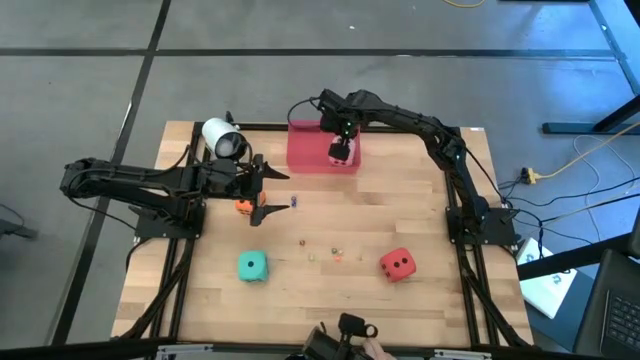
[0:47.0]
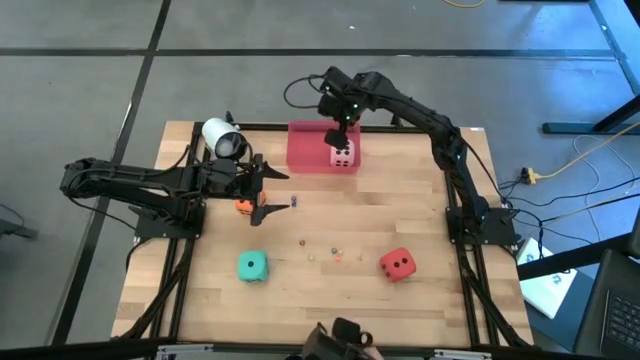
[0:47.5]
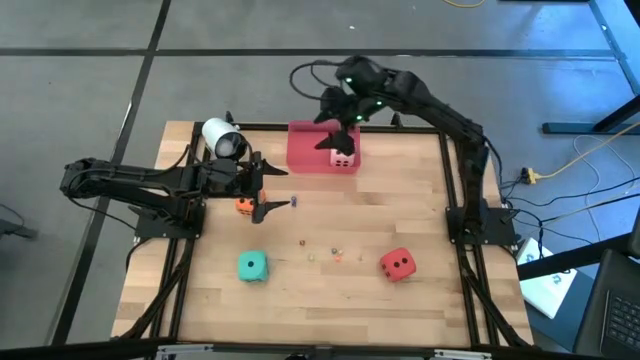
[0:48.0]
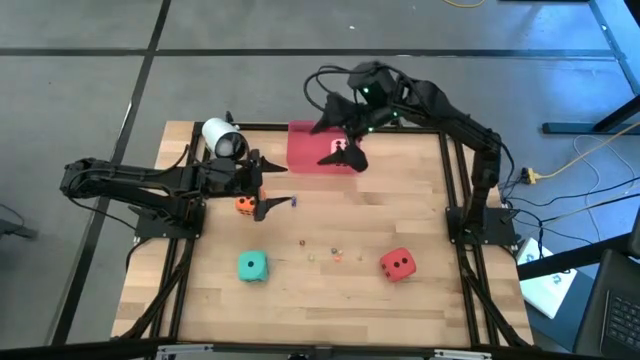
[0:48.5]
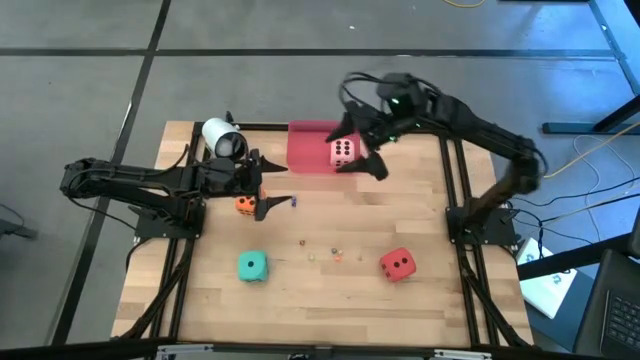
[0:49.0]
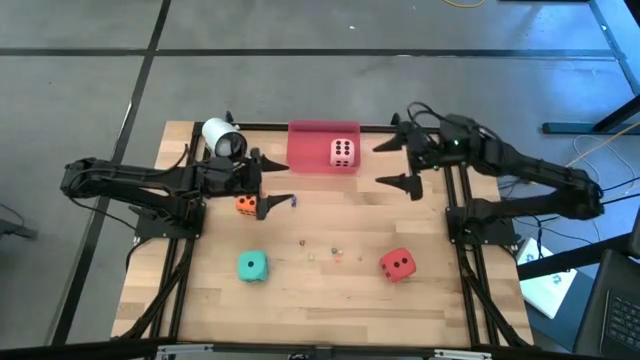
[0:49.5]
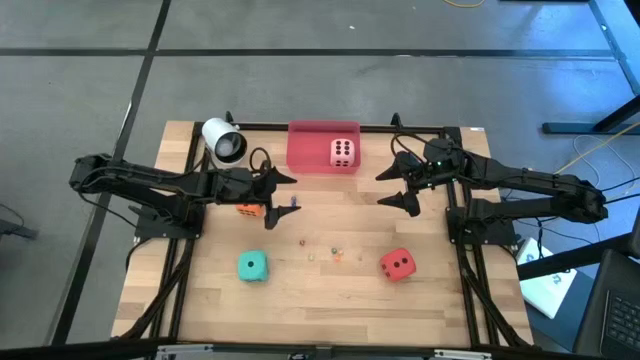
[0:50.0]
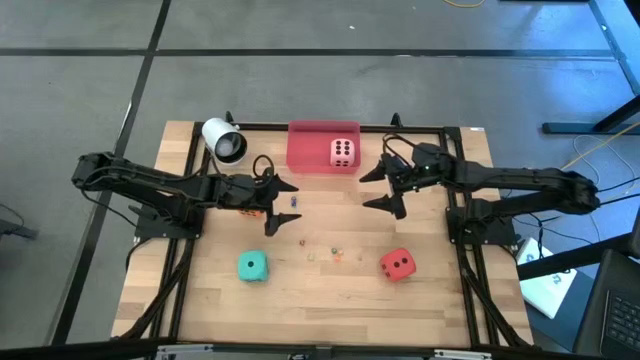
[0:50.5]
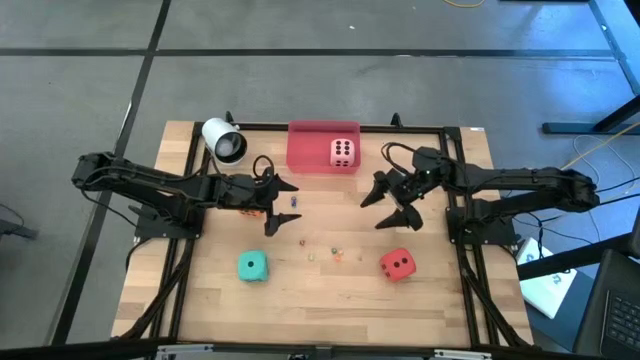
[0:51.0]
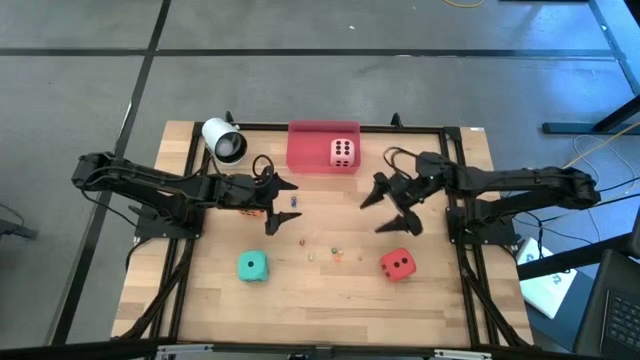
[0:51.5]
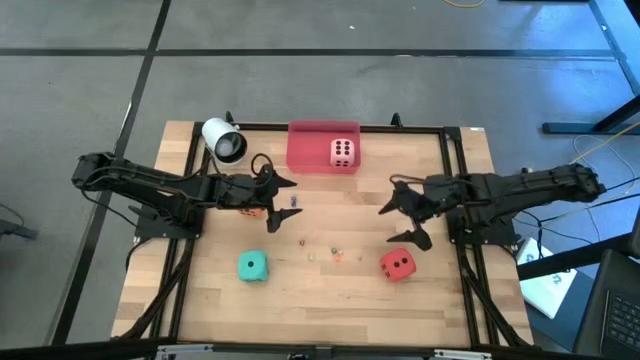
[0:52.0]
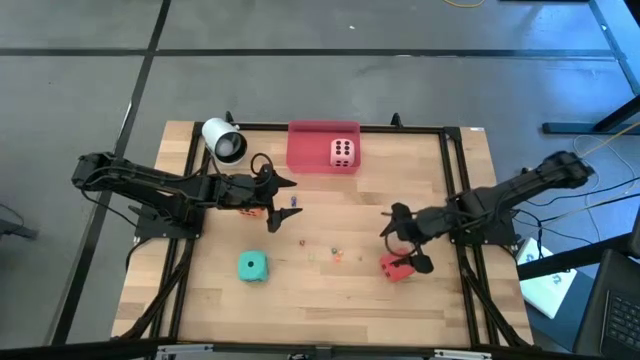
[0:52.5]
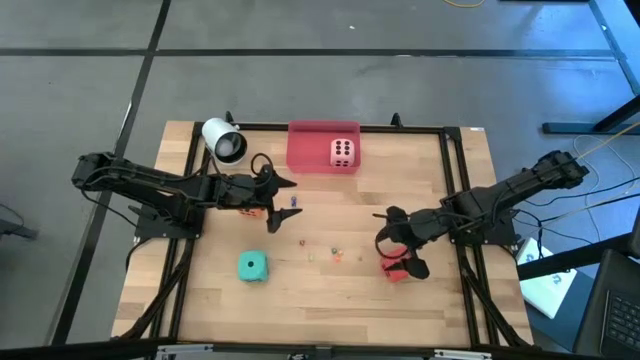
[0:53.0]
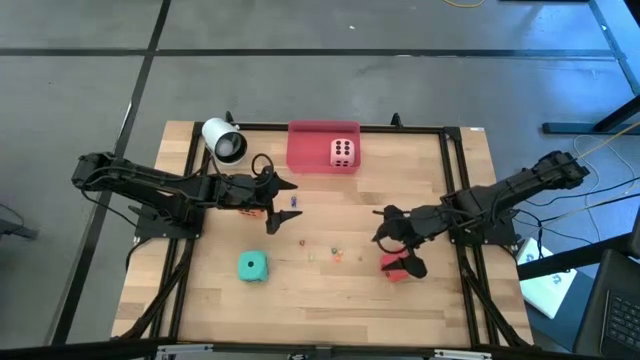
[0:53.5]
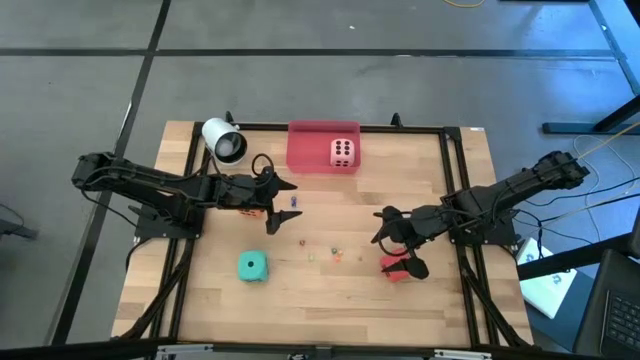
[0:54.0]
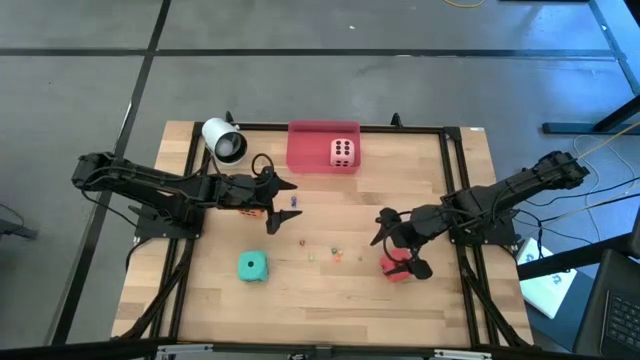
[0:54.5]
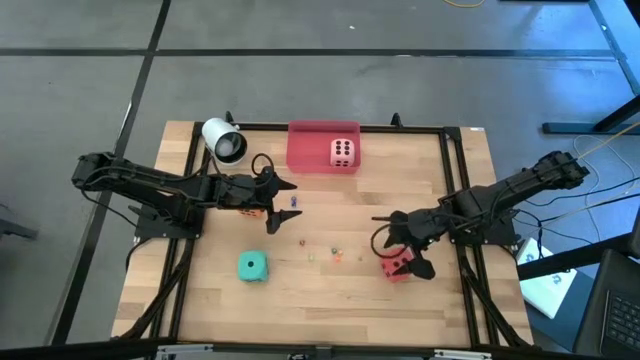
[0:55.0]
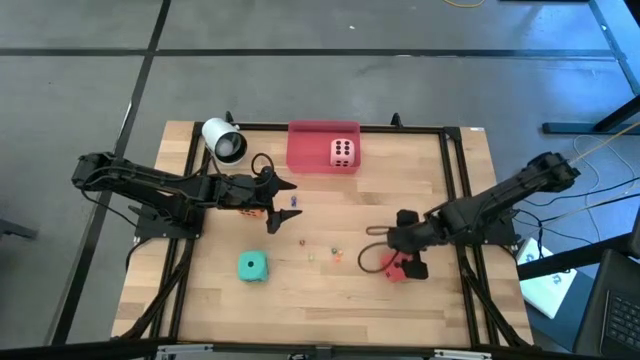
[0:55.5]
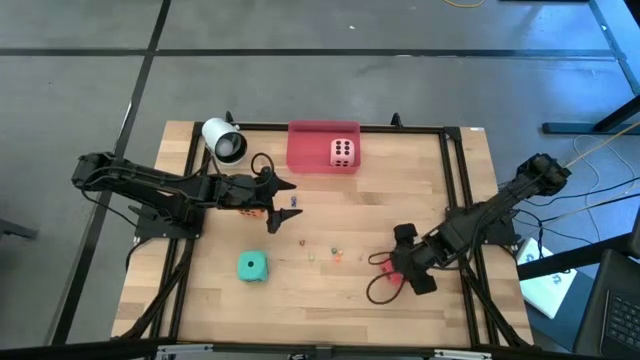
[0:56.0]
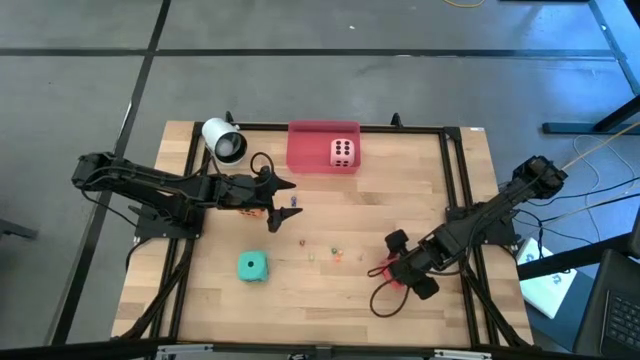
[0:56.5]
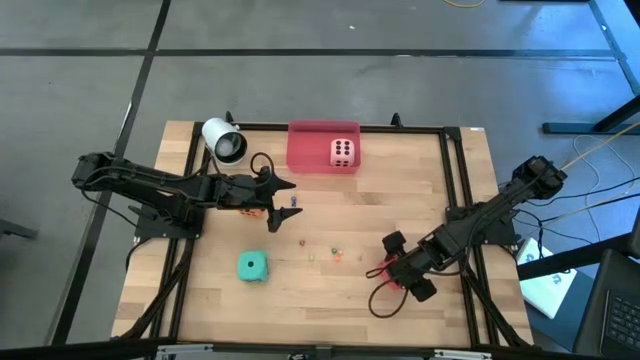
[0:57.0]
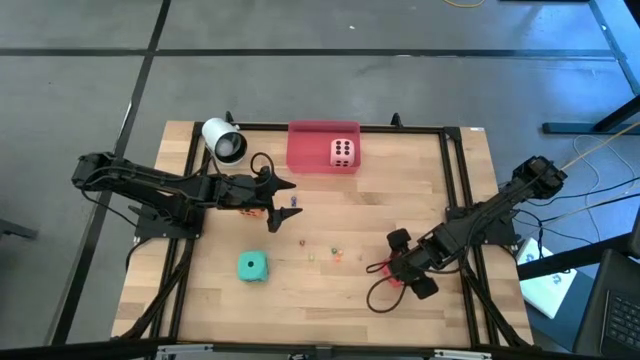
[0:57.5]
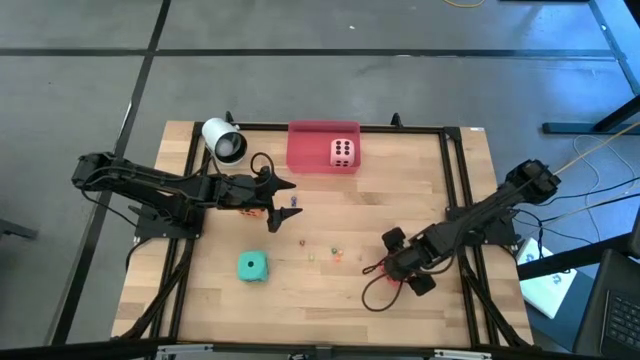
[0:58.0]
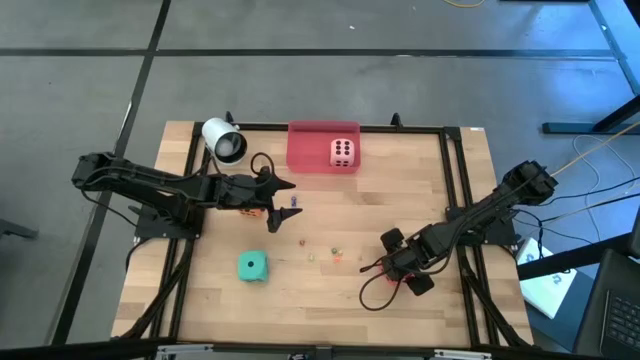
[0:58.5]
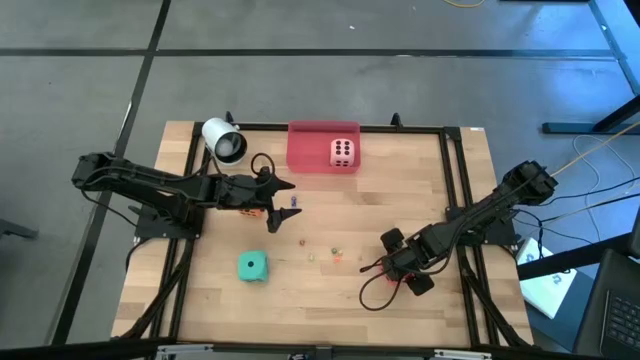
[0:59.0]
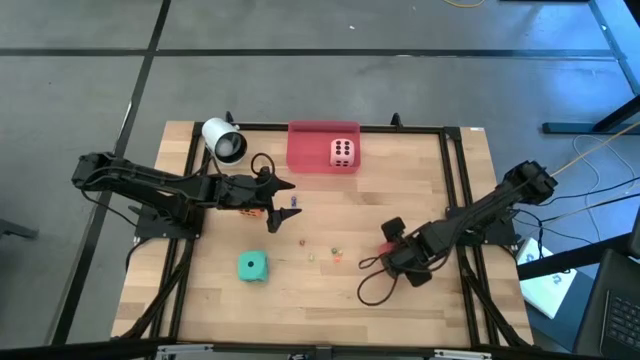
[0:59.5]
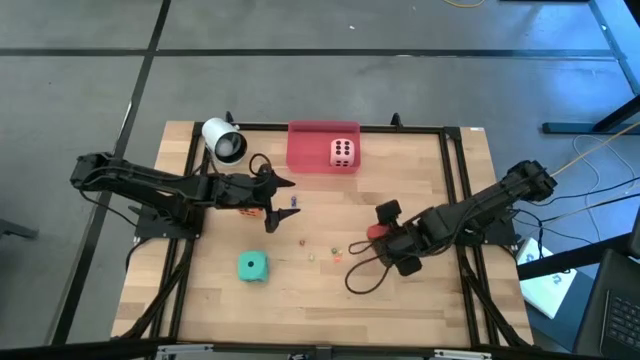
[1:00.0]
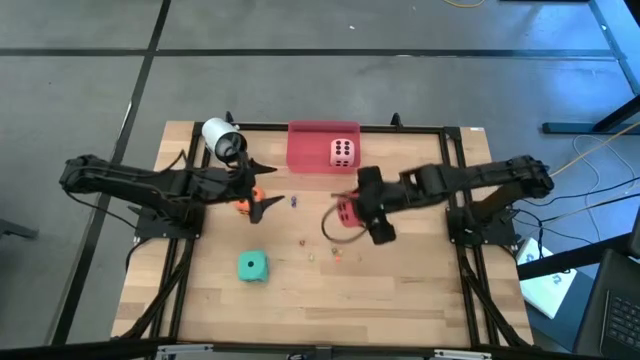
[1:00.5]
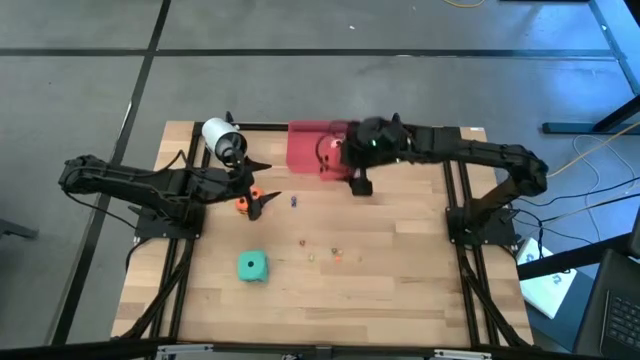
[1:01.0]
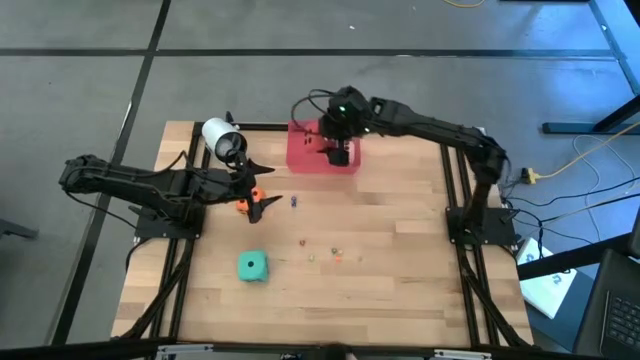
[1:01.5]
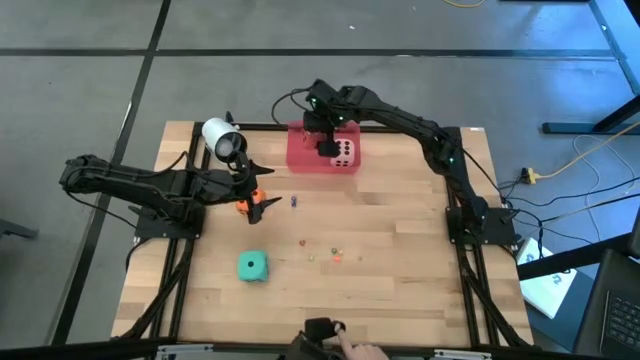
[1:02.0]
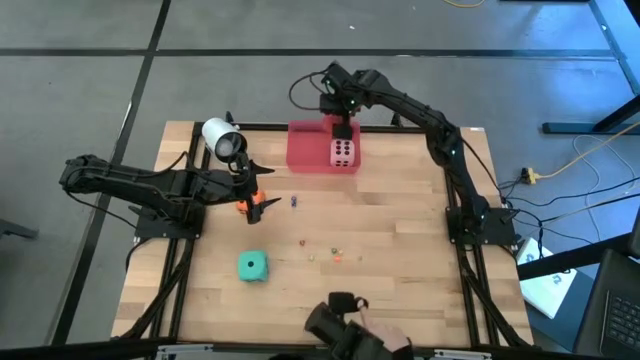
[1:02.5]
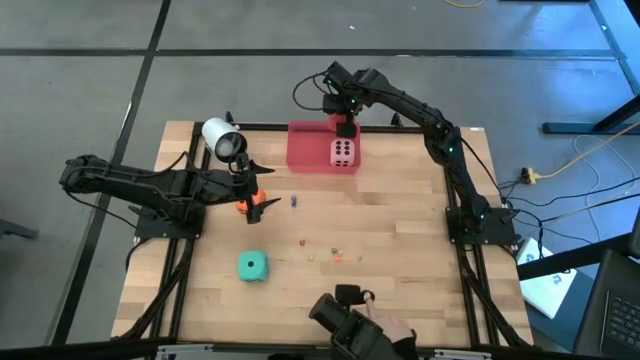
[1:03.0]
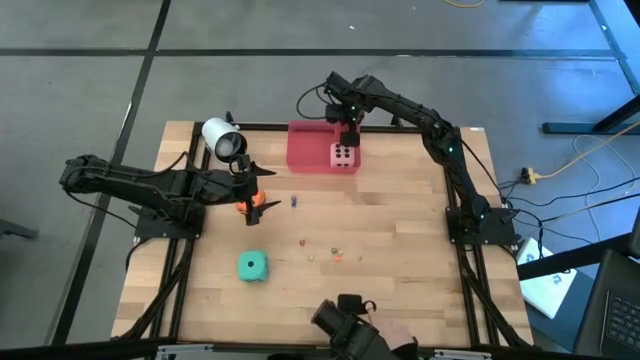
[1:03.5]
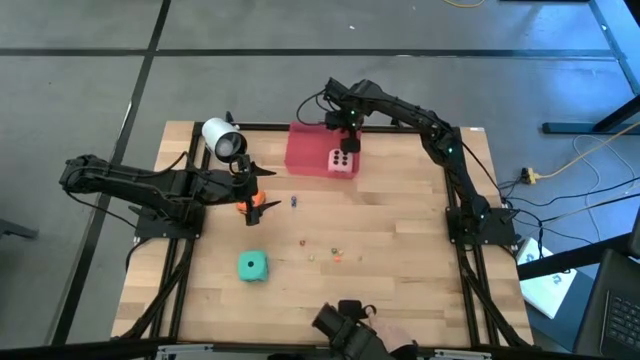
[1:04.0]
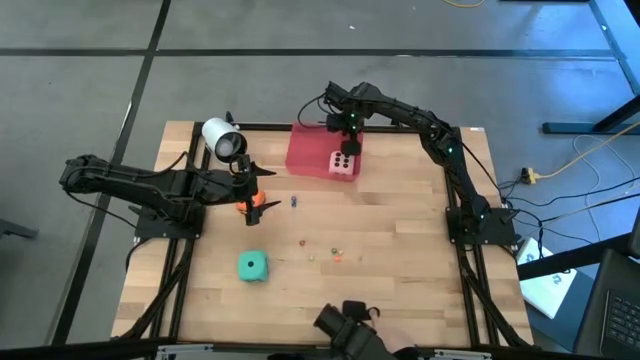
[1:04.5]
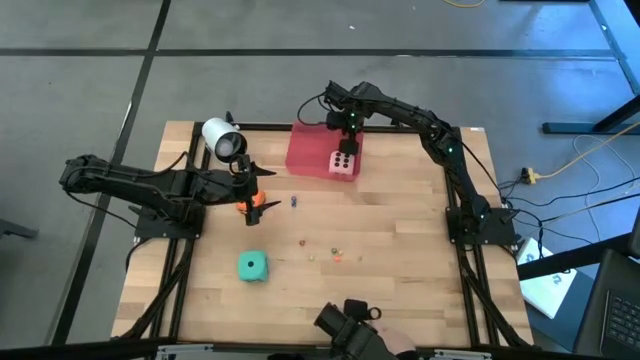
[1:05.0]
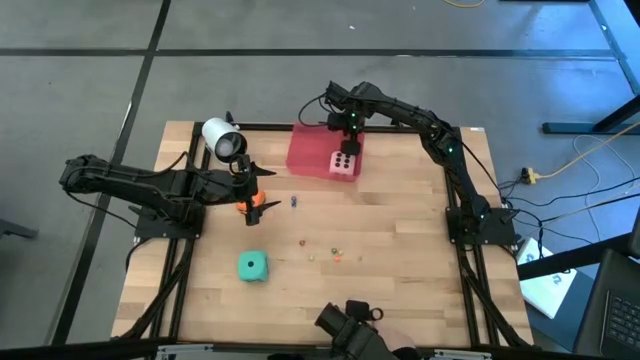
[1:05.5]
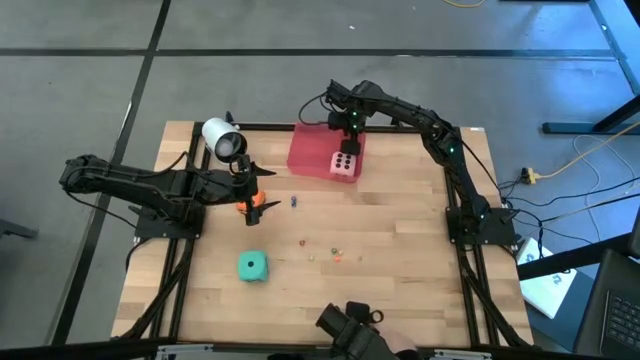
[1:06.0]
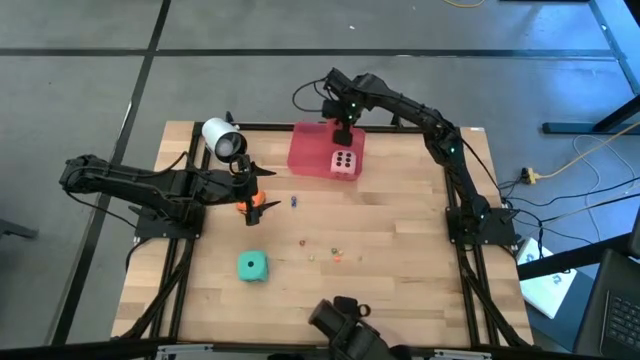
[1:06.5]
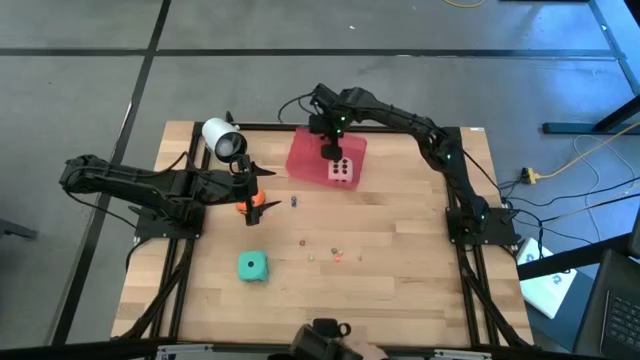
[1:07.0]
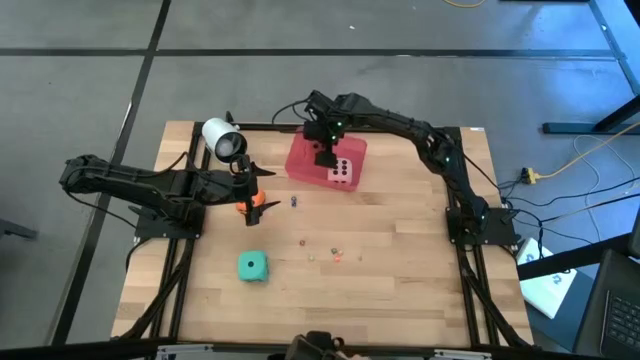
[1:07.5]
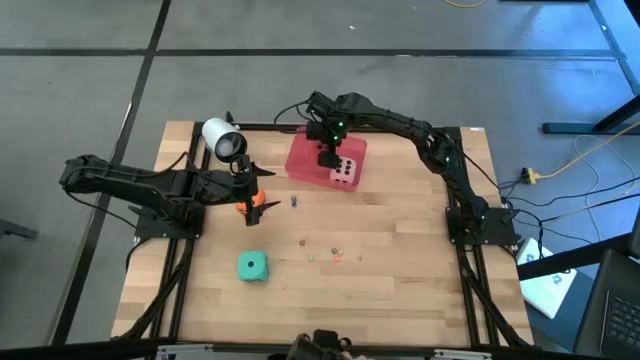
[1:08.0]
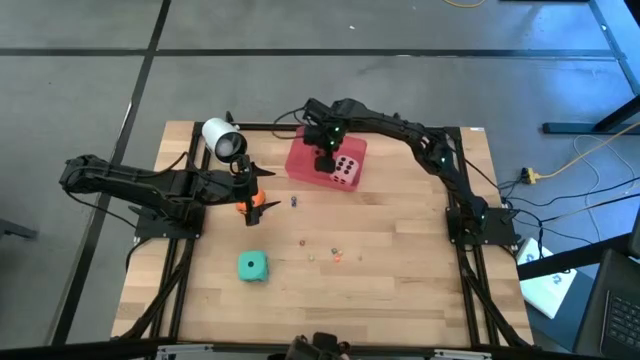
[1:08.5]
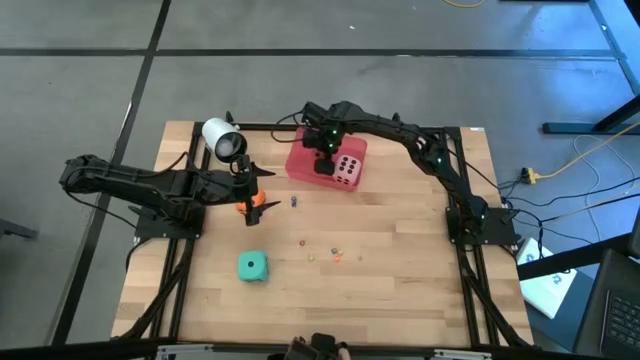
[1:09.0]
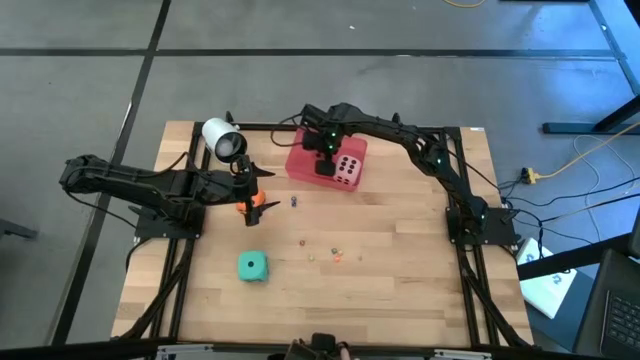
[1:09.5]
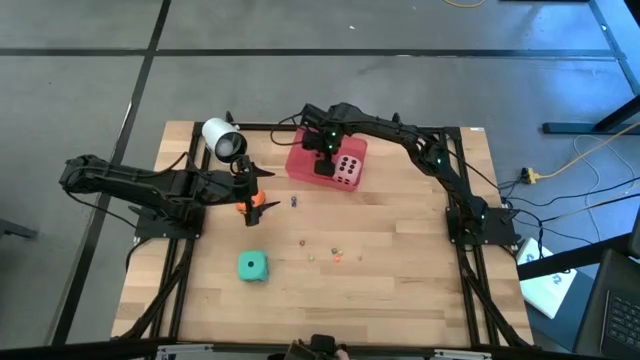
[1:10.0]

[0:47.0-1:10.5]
Task: Pick & Place Dice
Put the big red dice into the pink bin
